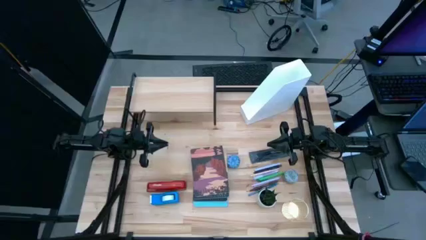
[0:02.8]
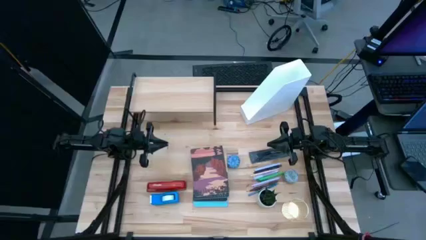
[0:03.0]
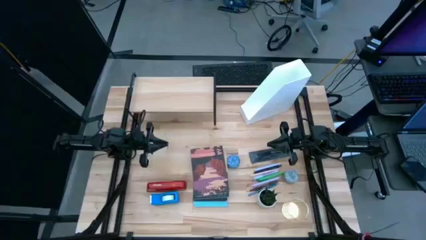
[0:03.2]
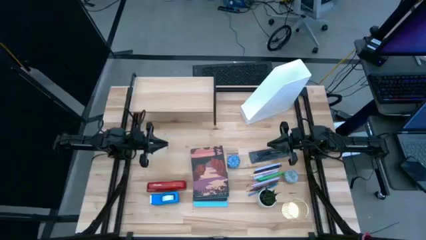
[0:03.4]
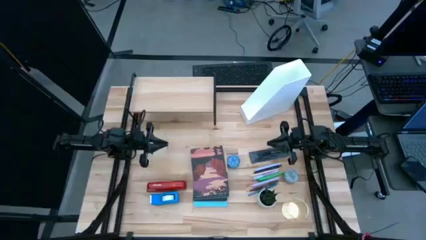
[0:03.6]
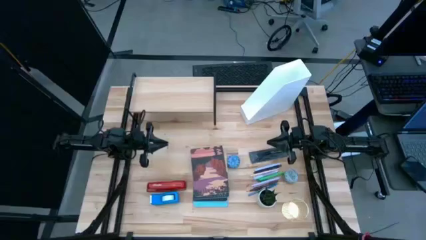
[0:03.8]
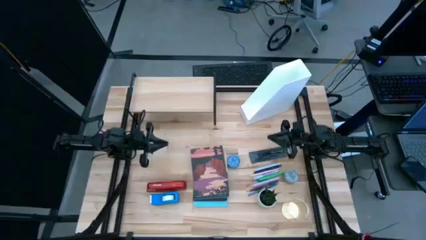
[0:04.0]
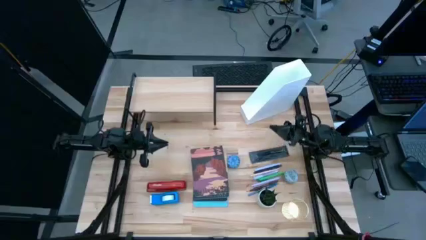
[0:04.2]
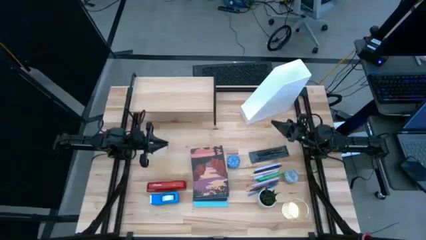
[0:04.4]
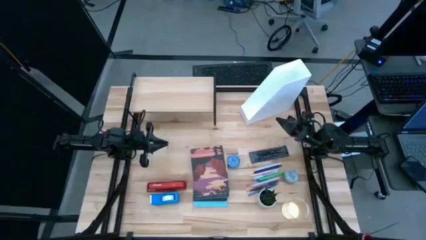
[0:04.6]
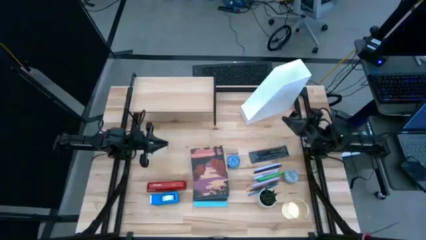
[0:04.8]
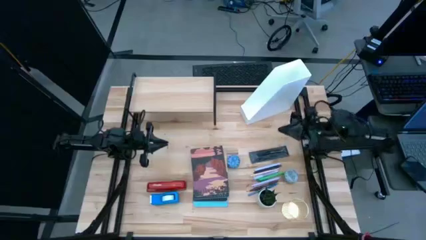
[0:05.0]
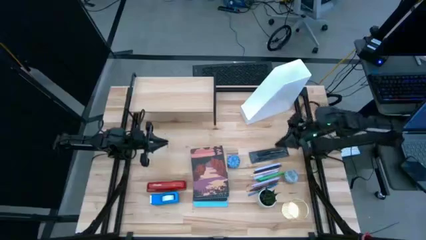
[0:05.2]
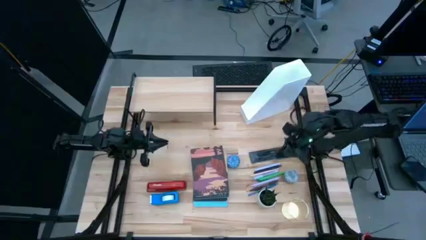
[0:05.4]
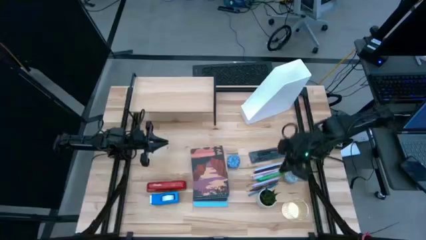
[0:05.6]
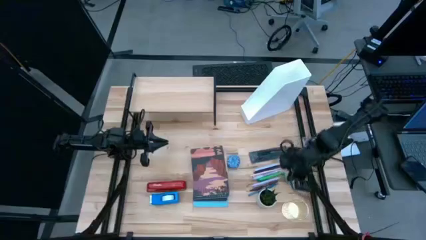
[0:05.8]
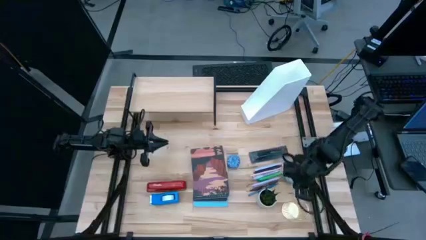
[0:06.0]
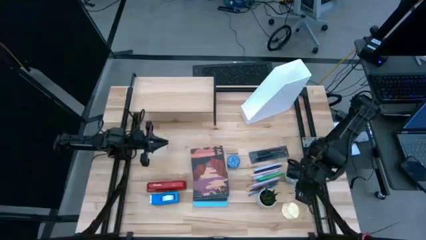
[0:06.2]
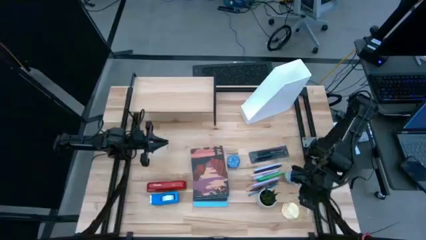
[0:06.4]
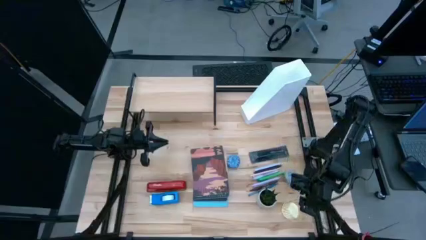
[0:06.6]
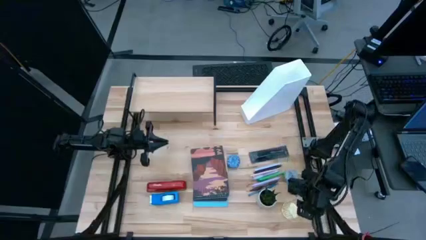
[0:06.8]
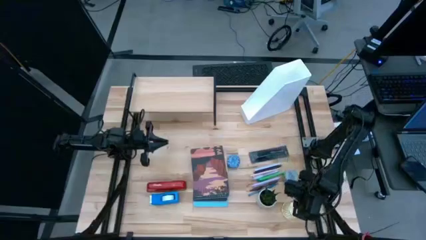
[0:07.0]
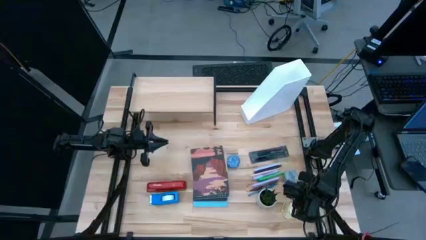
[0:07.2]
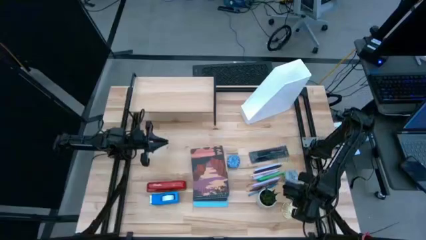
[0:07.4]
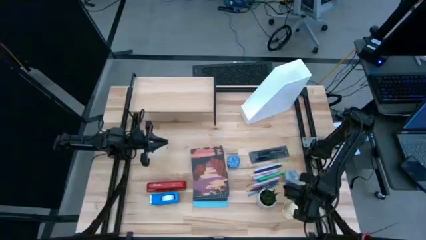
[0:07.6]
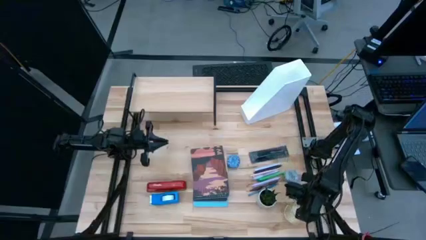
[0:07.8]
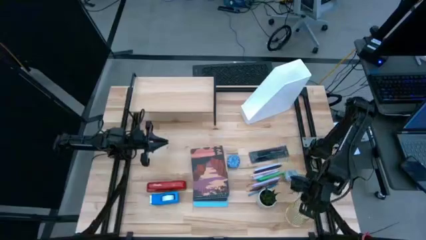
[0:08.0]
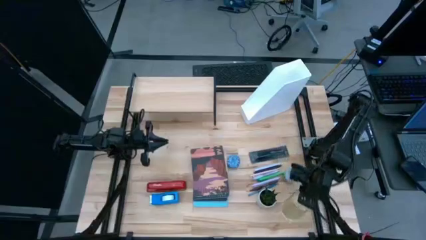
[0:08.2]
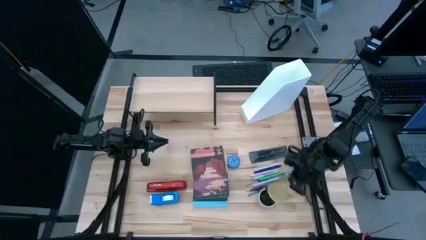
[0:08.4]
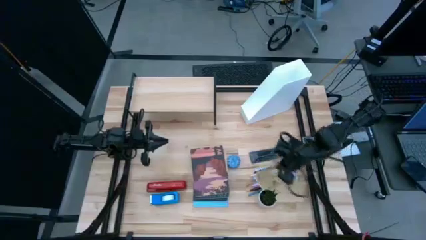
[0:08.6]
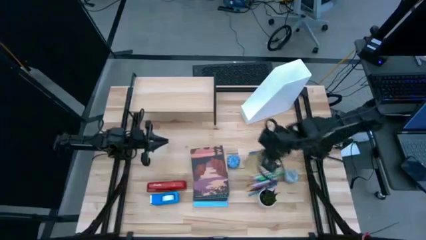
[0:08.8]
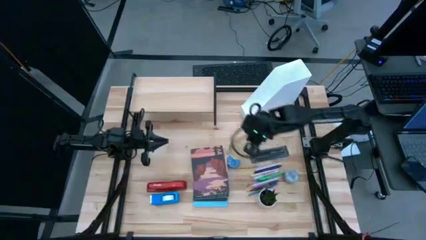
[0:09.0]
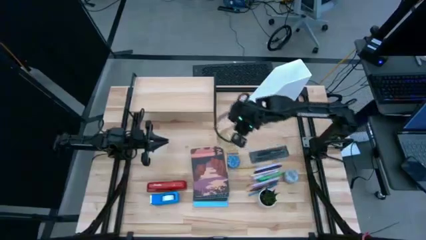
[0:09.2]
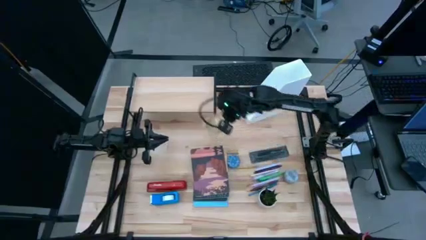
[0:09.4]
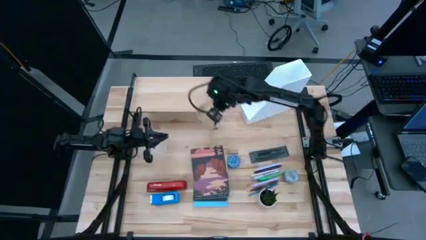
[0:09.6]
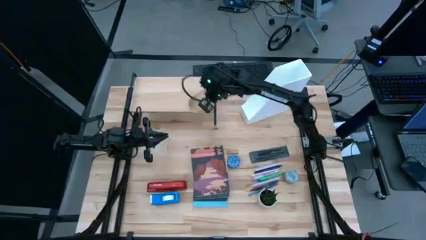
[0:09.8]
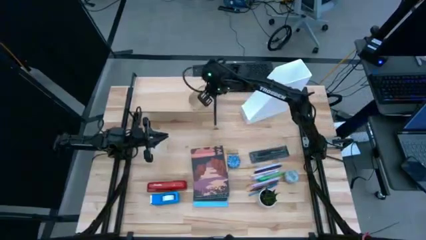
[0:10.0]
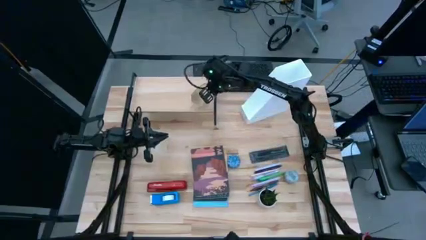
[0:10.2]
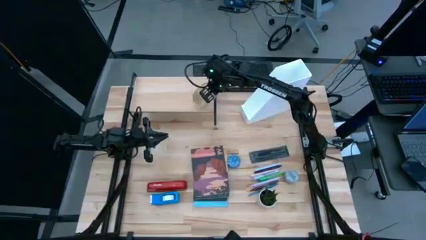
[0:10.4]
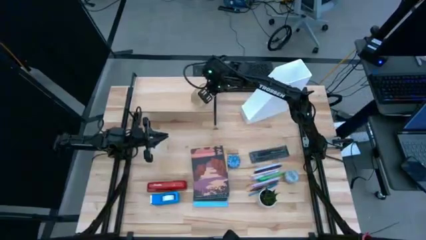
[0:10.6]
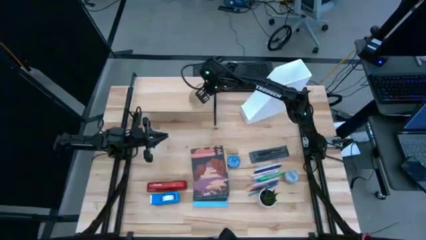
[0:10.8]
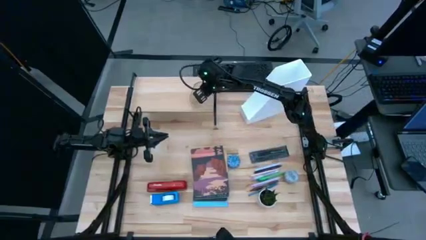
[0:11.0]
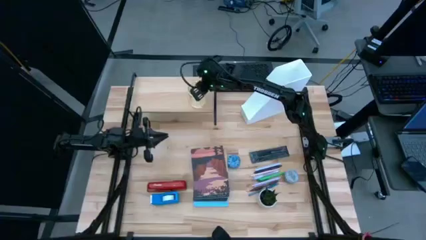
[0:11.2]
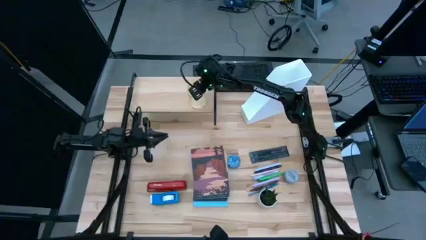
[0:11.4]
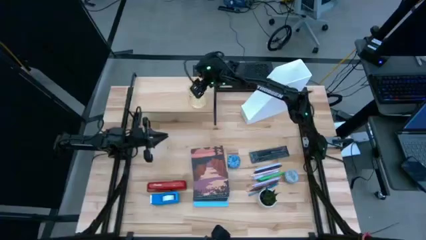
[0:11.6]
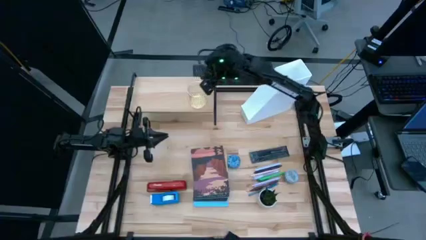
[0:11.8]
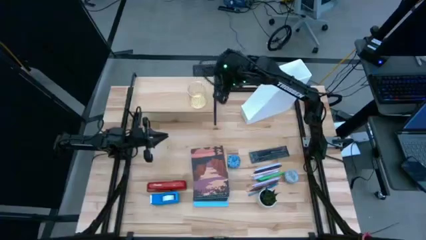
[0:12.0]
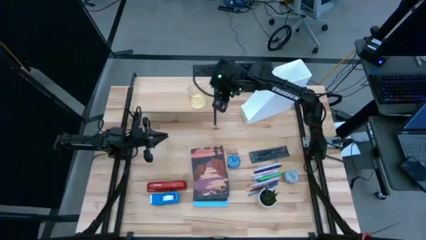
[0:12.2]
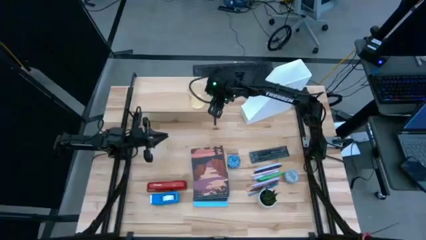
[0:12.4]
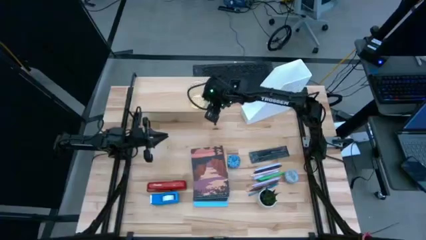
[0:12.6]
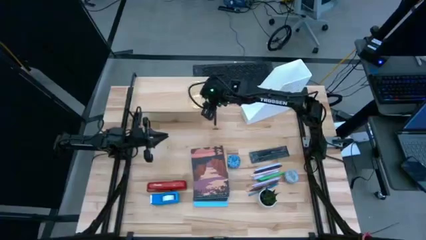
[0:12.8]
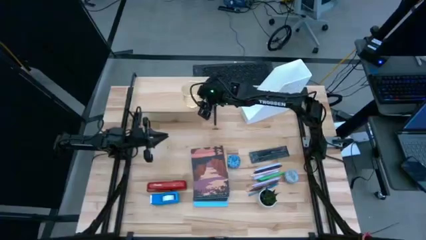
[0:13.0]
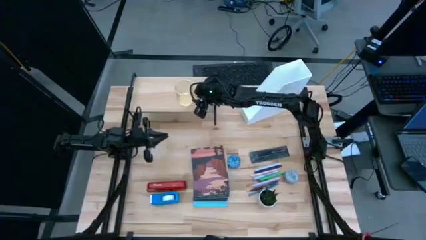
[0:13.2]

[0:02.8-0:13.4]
Task: Stock shelves
Put the gold pen holder on the shelf

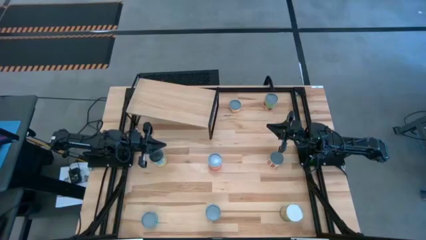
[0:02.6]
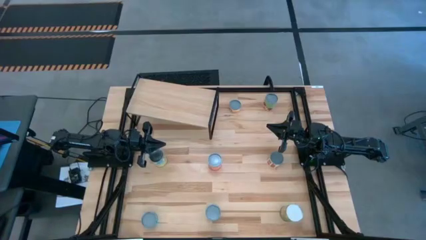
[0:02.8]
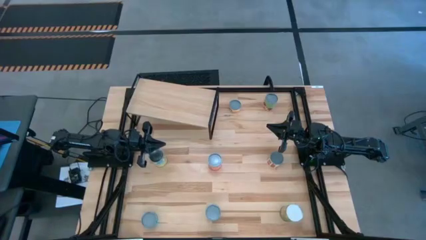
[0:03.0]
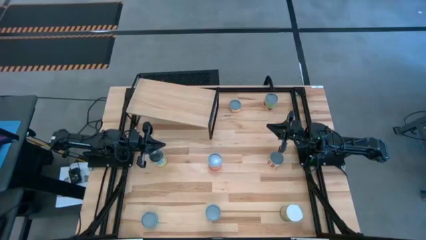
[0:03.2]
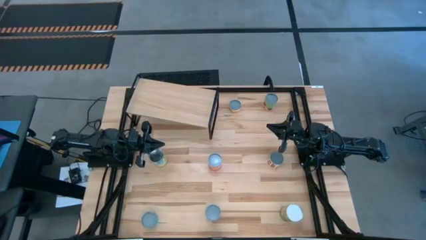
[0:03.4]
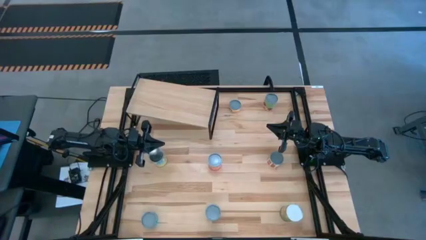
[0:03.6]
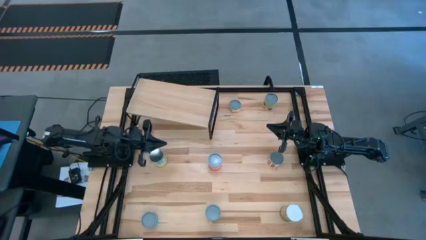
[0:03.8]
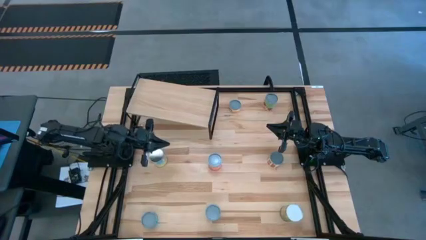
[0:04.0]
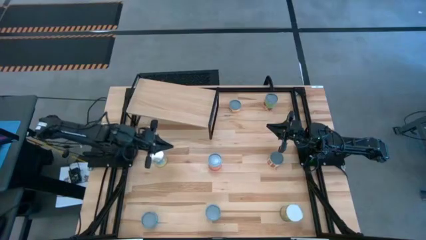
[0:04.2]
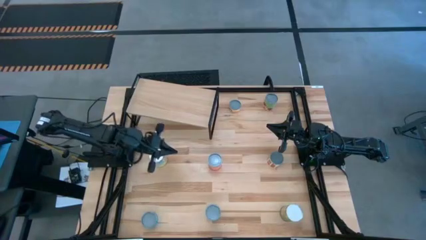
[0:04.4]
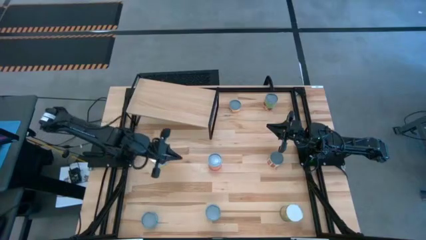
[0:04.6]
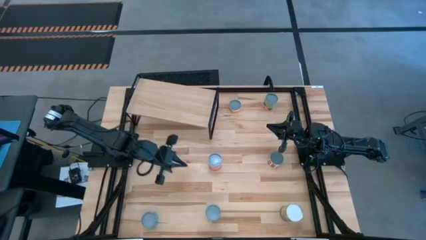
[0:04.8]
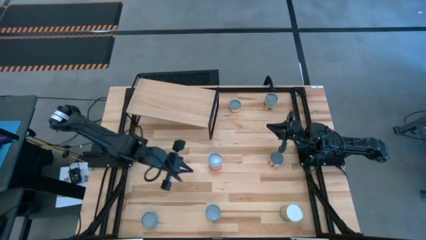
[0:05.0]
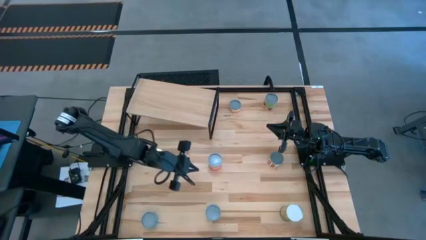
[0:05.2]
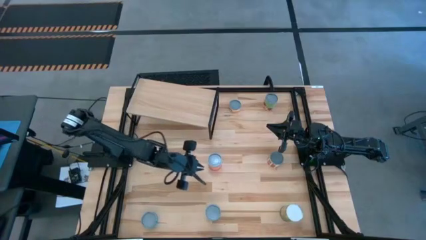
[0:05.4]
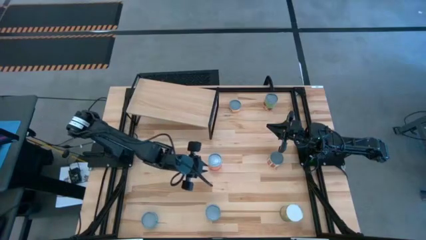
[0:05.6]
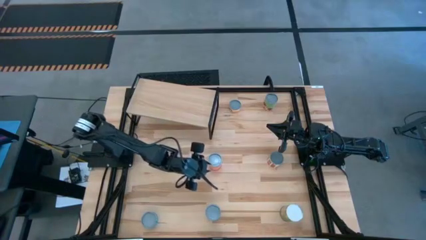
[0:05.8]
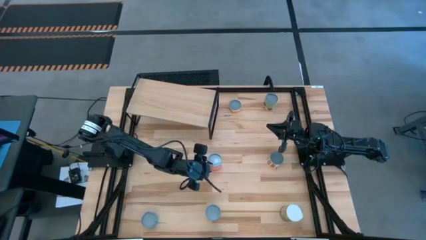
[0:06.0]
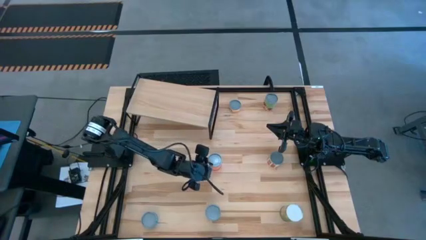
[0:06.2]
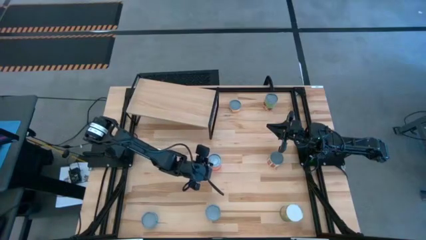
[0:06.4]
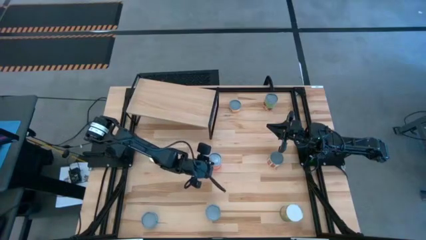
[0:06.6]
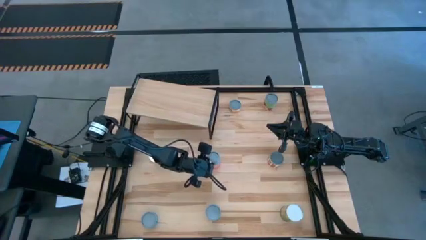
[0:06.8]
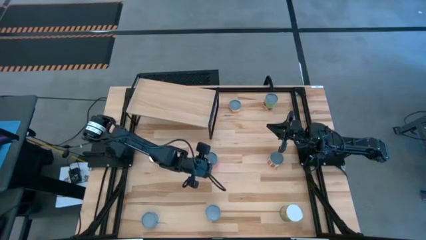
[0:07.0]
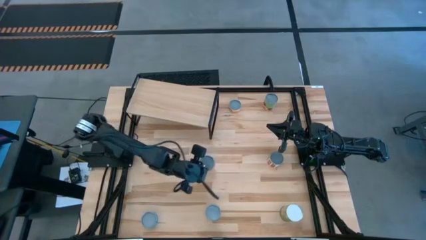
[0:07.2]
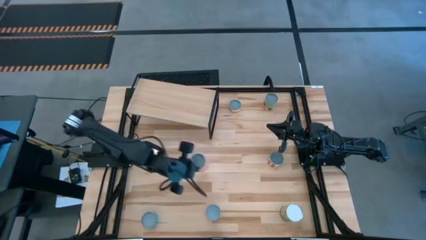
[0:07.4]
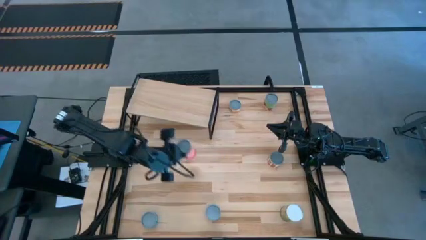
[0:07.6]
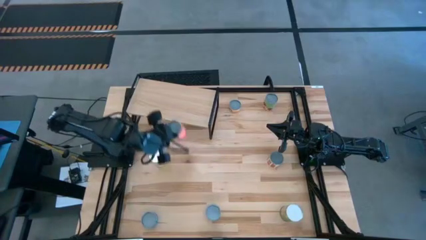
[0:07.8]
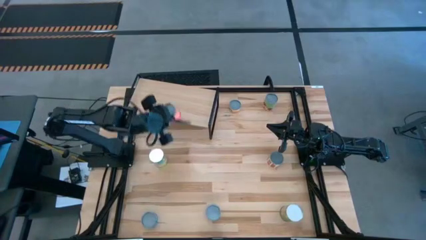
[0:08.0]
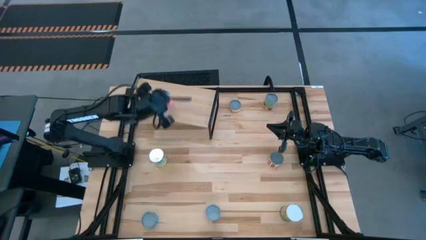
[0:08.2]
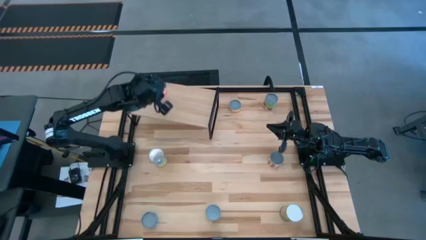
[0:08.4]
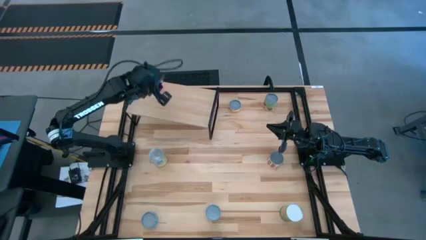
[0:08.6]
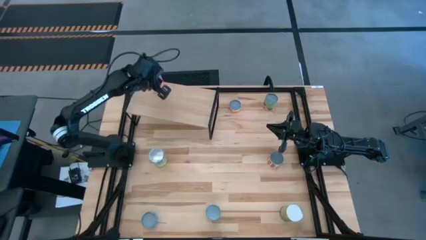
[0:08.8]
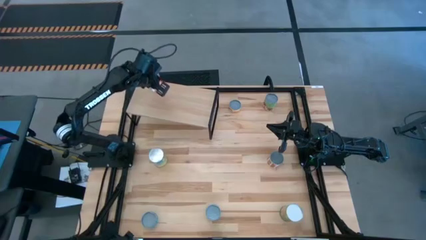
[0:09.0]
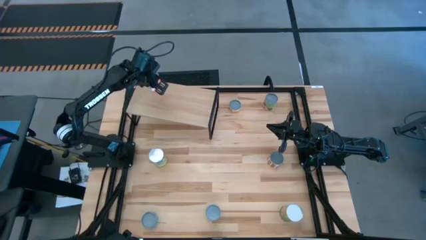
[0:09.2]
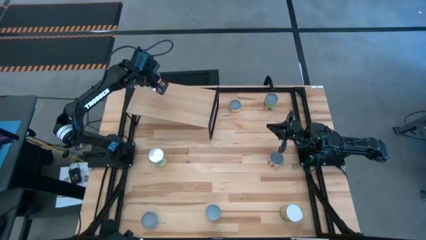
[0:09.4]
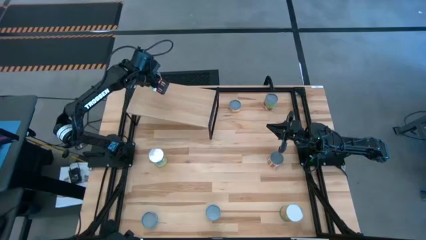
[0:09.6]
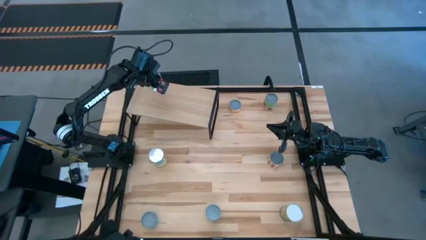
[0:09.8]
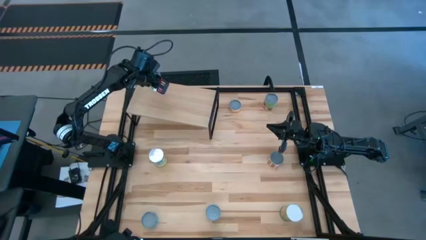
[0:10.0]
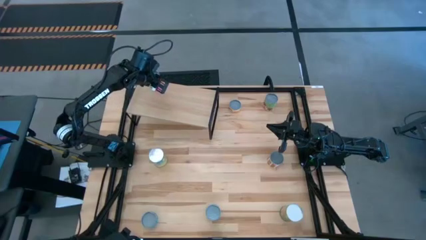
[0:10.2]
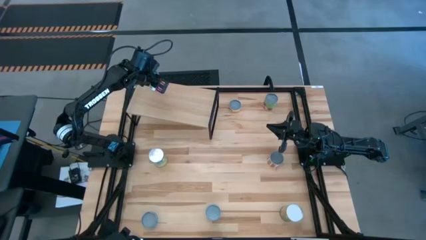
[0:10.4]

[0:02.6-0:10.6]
Task: Pick and place cans onto a shelf
Put the canned mixed fruit on the shelf
